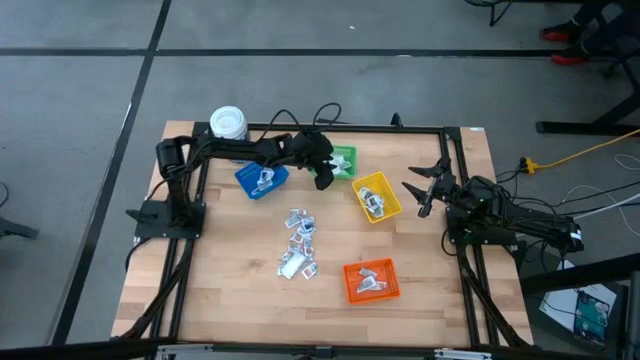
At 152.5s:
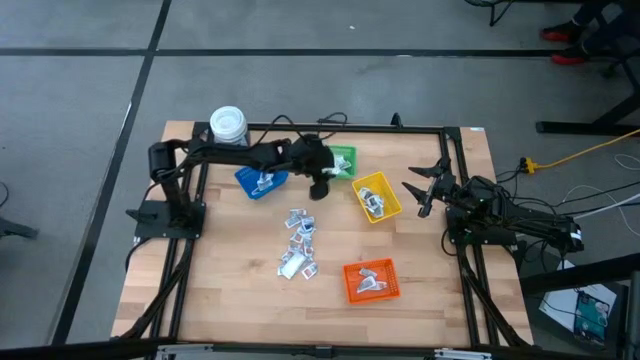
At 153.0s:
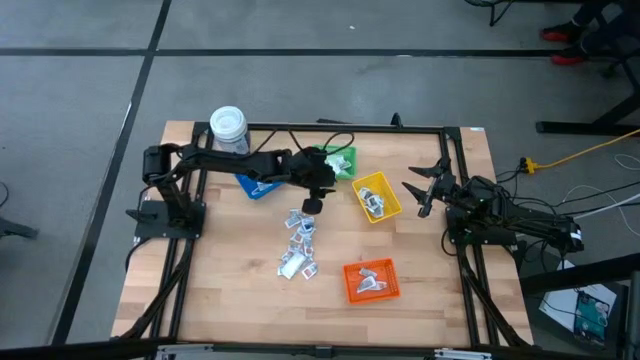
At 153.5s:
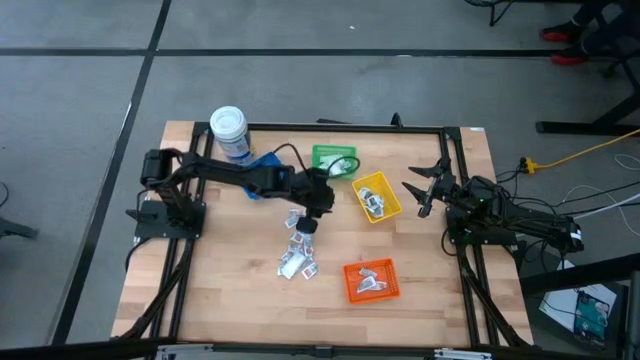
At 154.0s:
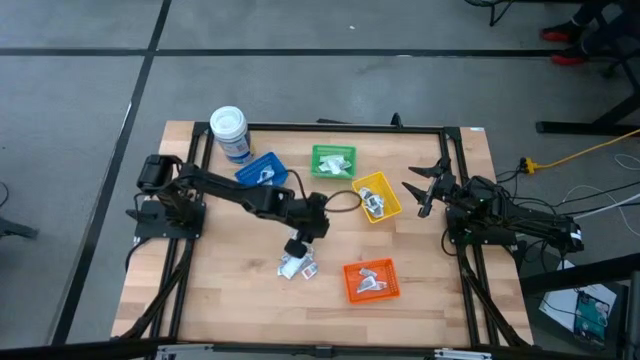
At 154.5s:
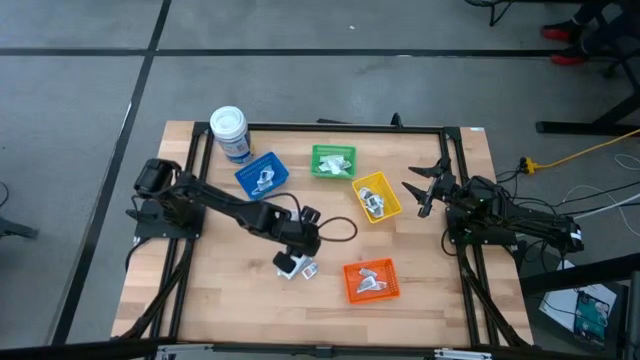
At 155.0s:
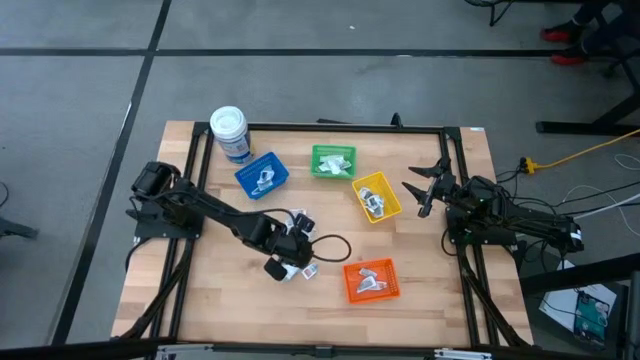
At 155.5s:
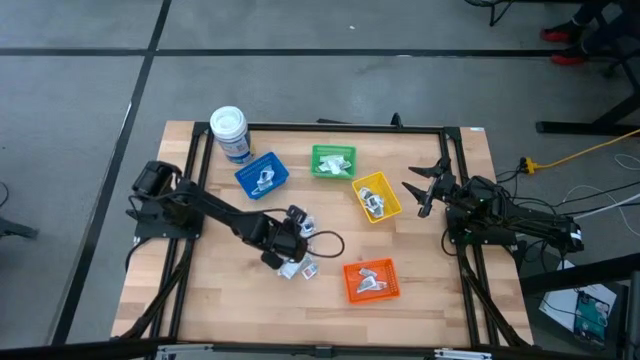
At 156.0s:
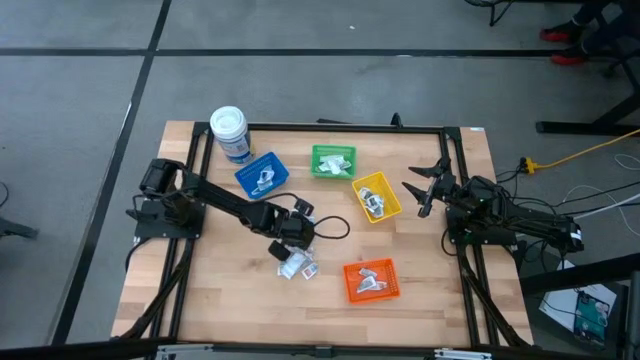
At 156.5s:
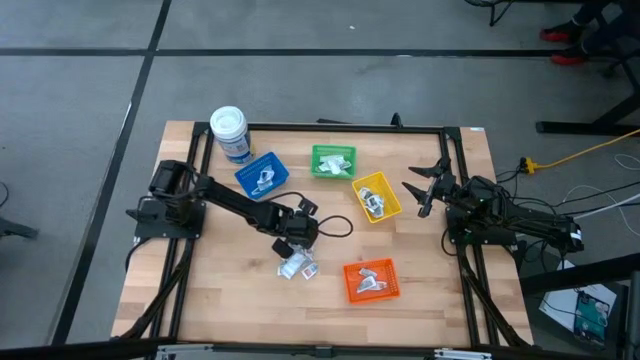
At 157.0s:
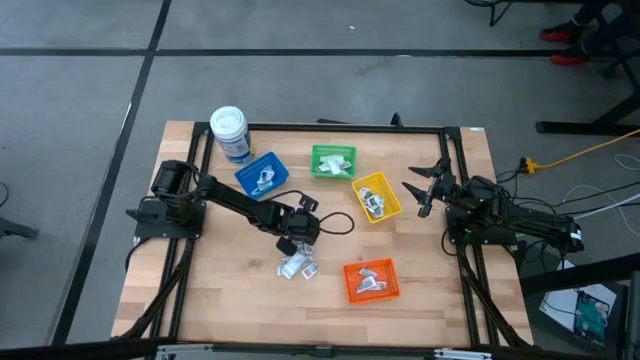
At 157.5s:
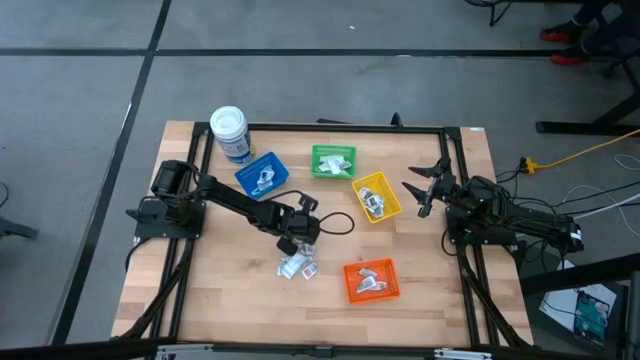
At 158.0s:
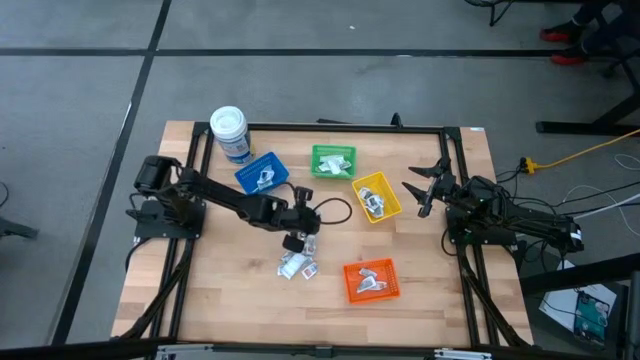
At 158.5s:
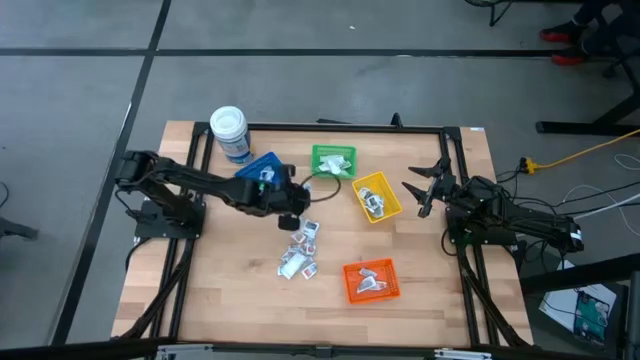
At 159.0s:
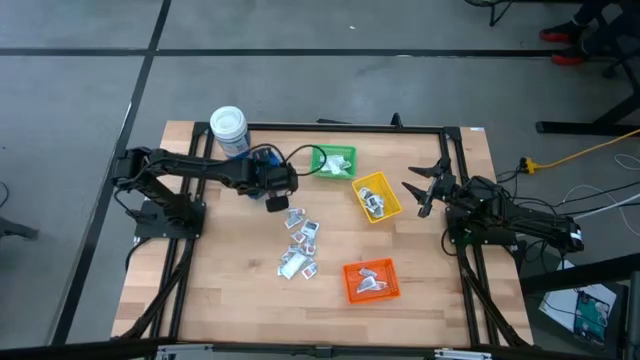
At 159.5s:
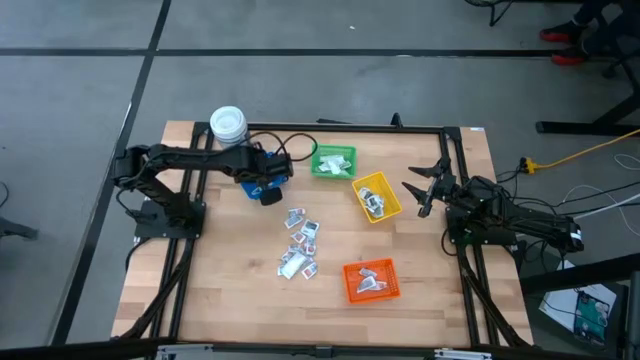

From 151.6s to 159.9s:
Task: Pick & Place First Aid Supplies
Put the white alcohol pad into the blue bin

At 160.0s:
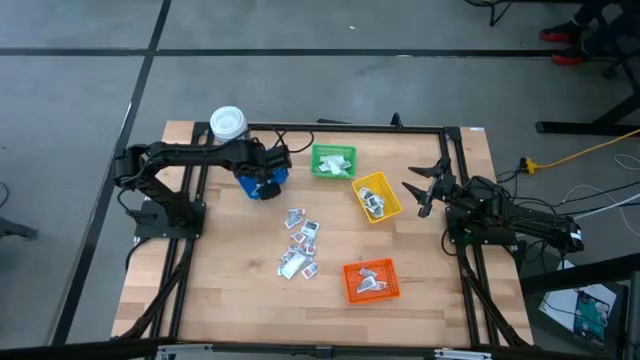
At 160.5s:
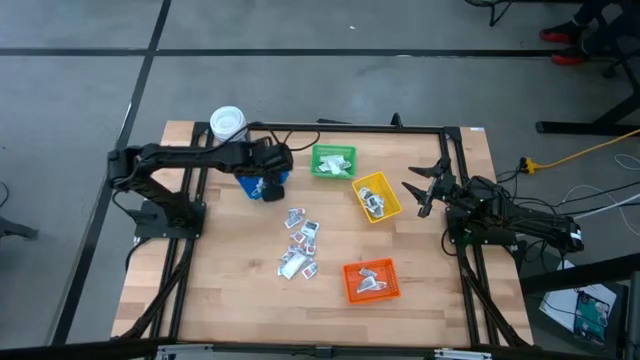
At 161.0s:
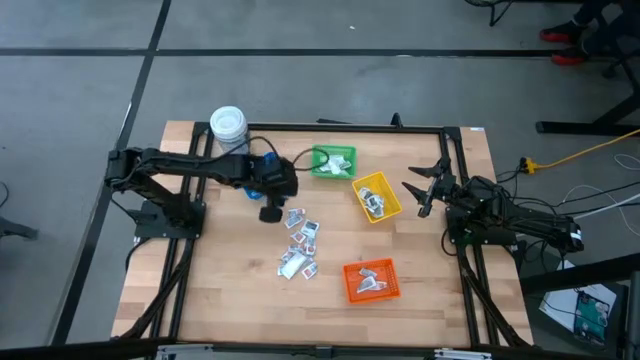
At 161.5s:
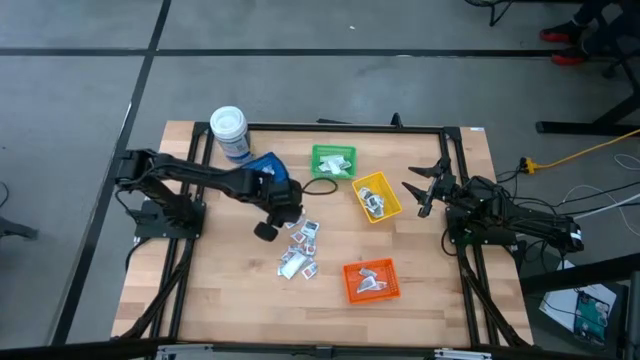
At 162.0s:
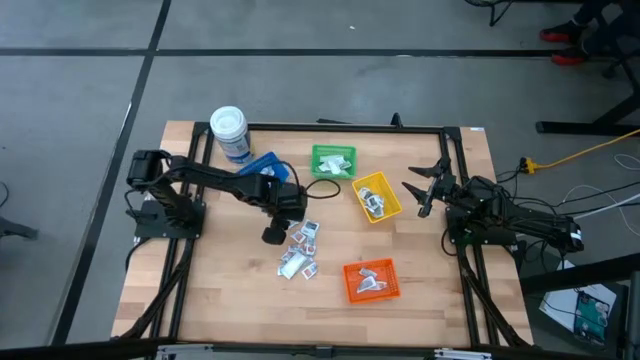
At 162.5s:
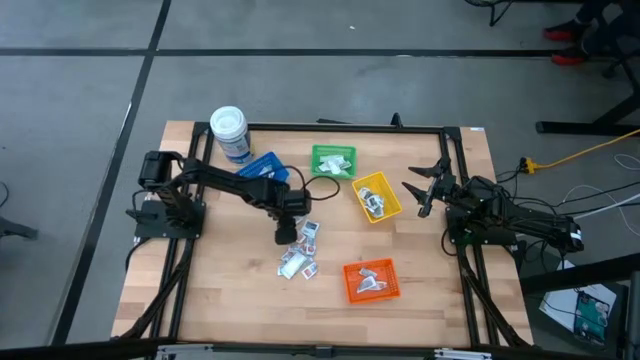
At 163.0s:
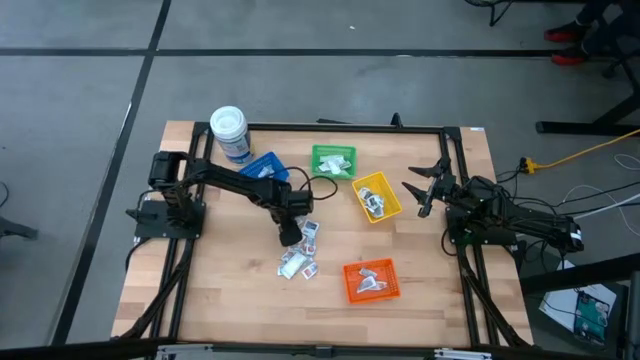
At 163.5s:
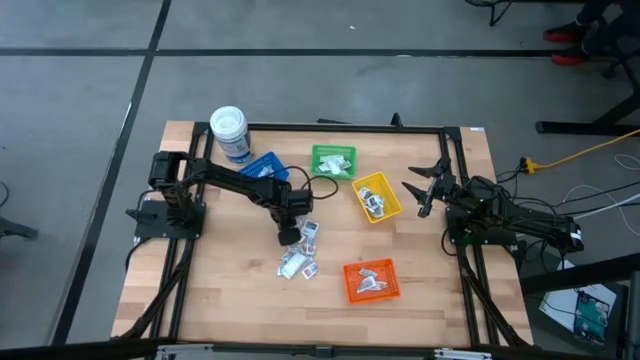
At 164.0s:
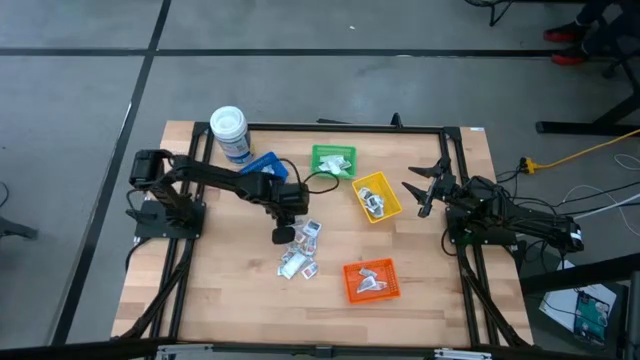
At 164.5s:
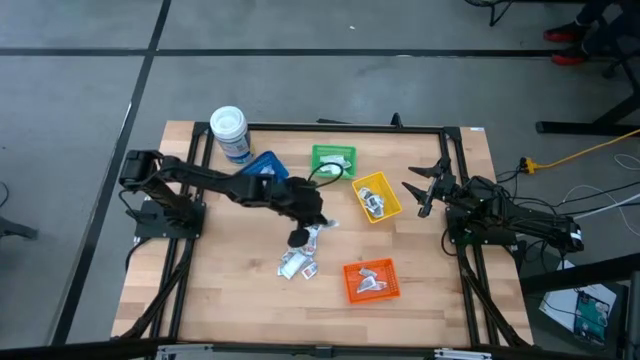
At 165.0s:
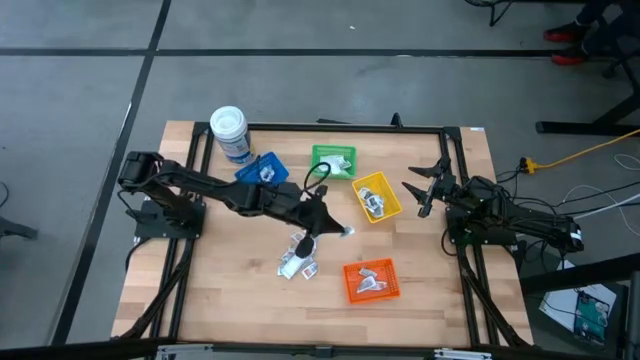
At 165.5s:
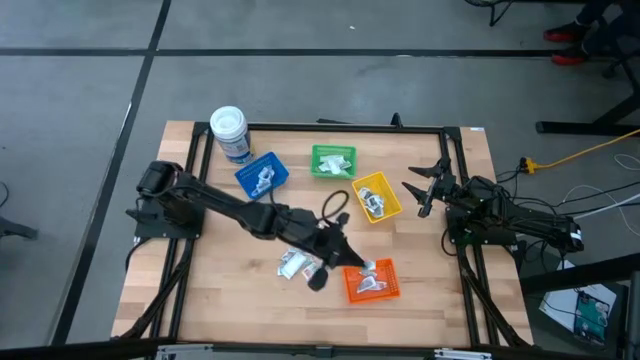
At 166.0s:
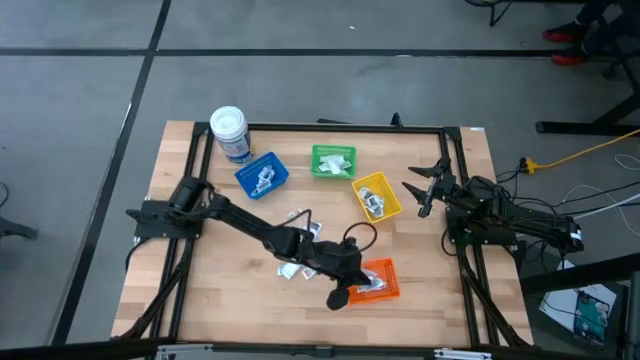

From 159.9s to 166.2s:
Put the white ointment pack into the orange bin

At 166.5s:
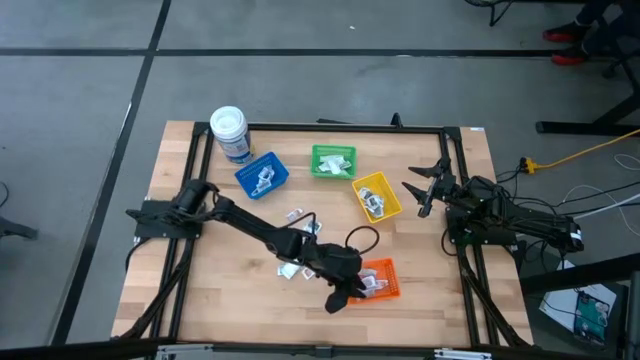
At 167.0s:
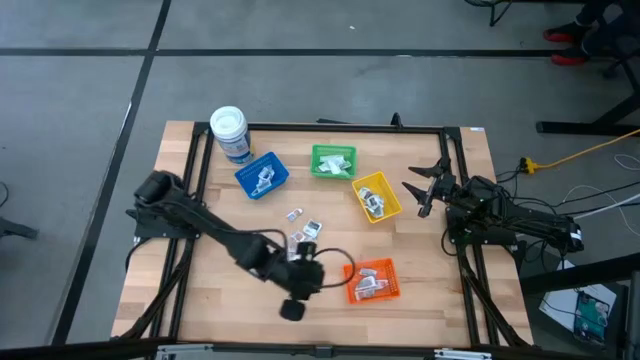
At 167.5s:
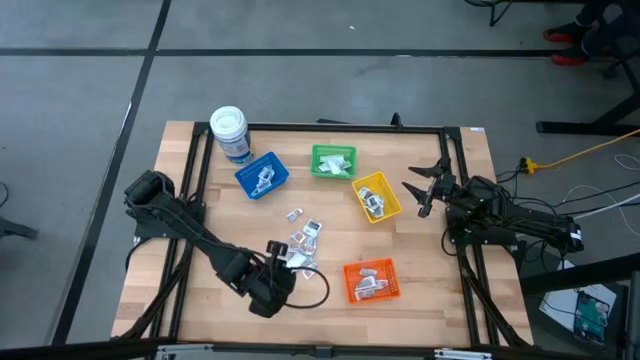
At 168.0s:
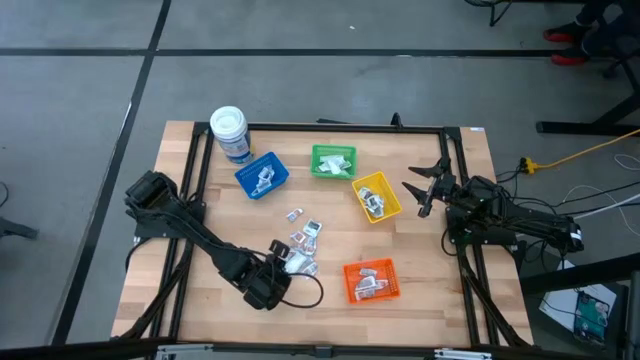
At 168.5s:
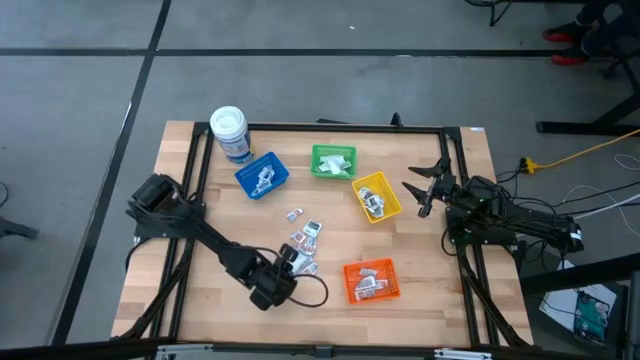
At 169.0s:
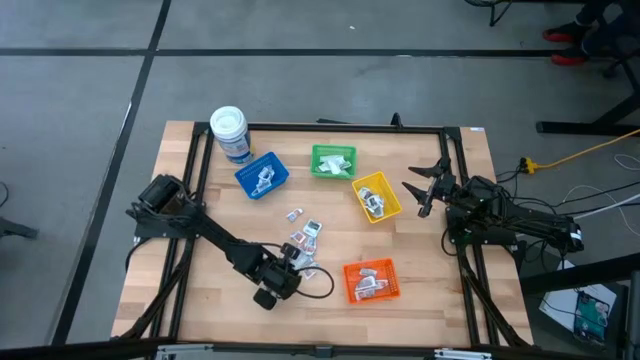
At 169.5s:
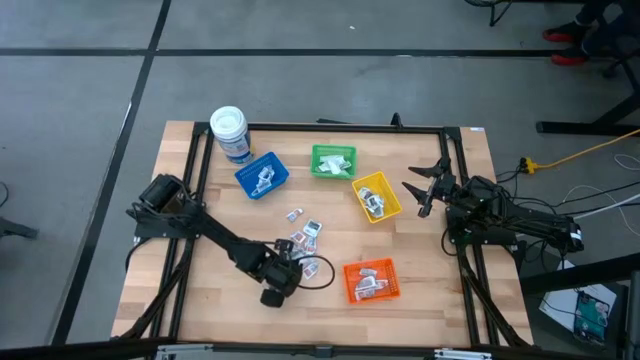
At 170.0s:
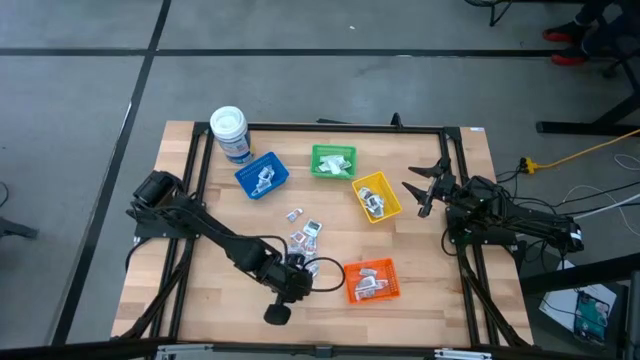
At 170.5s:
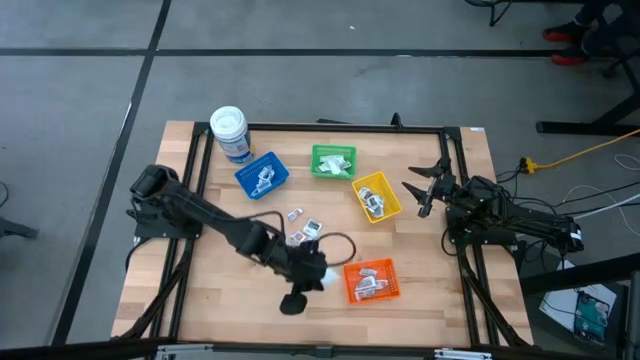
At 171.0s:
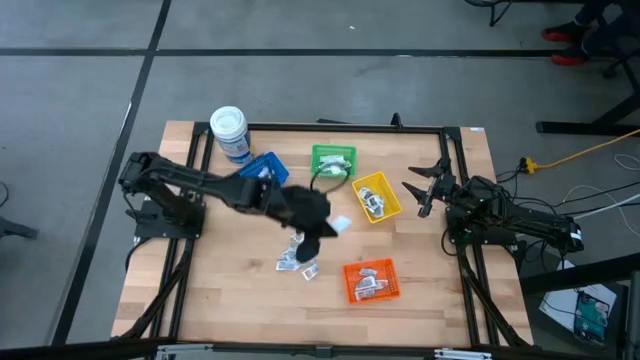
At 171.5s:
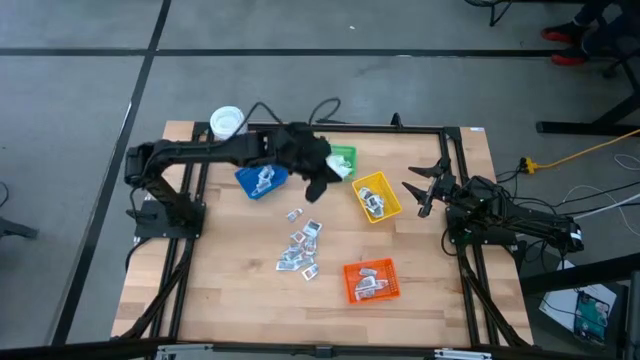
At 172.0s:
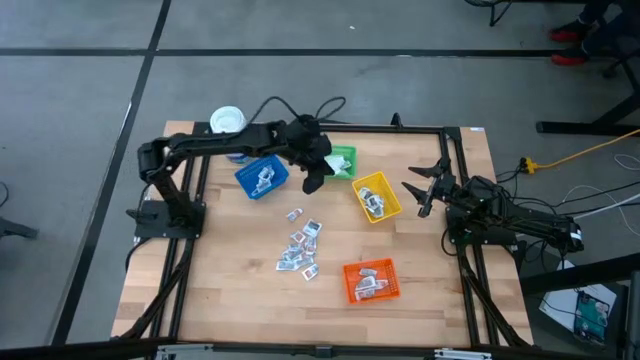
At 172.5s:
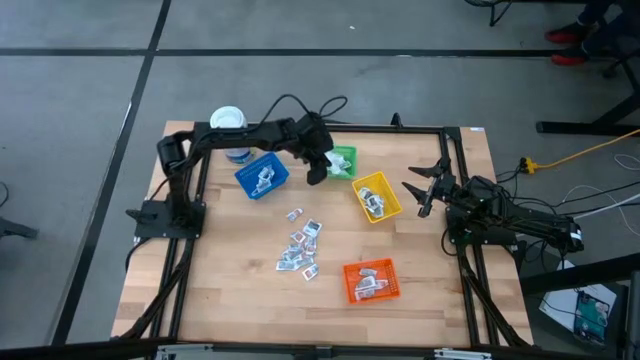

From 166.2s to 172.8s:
Put the white bandage into the green bin
